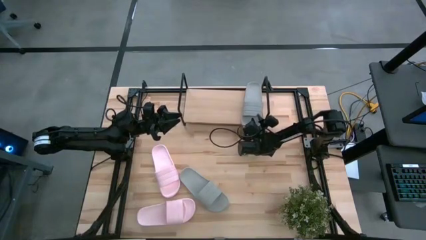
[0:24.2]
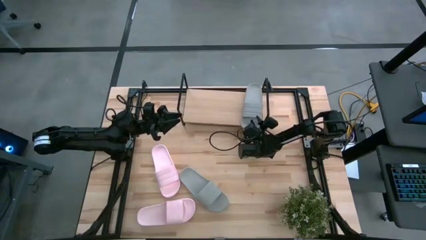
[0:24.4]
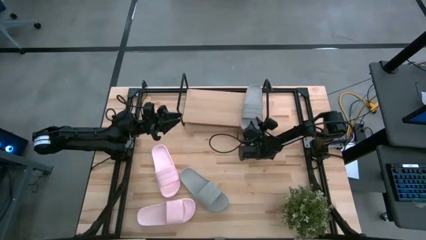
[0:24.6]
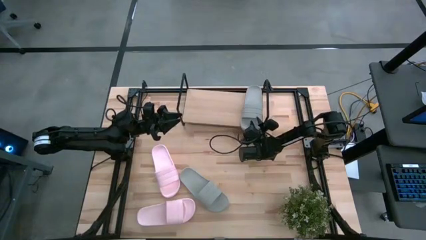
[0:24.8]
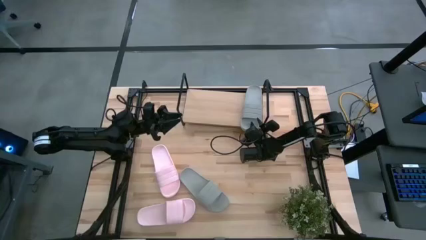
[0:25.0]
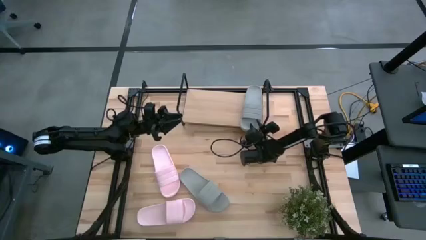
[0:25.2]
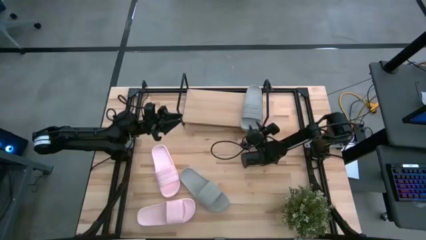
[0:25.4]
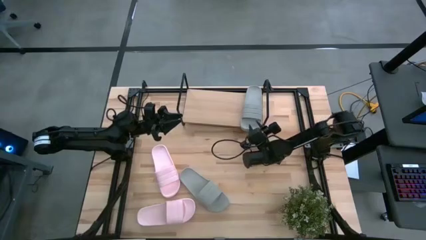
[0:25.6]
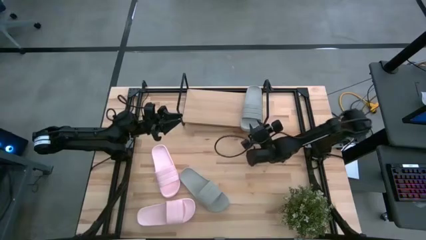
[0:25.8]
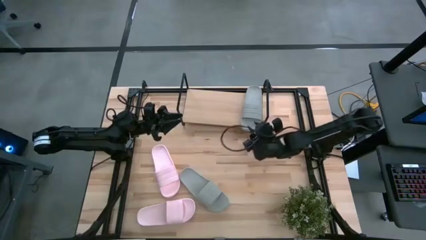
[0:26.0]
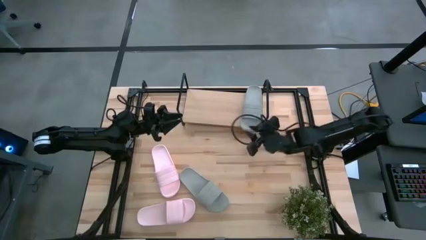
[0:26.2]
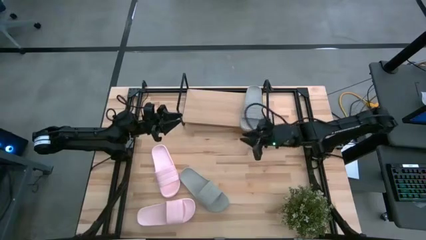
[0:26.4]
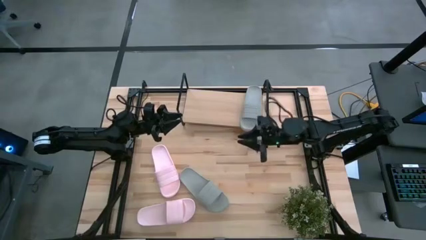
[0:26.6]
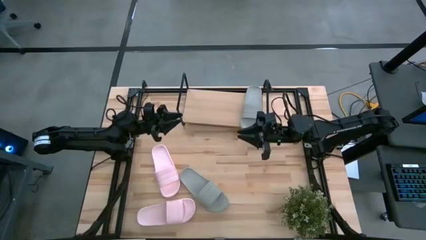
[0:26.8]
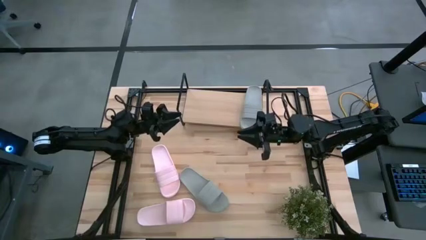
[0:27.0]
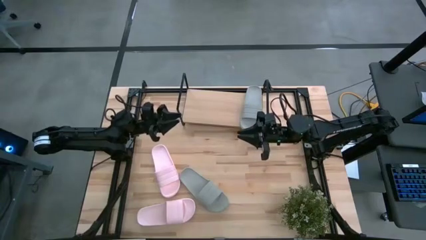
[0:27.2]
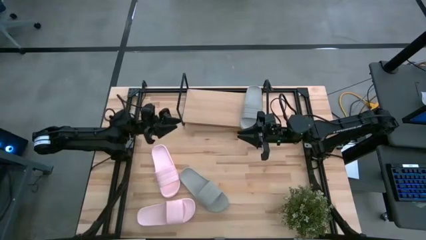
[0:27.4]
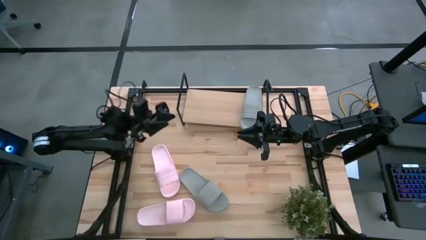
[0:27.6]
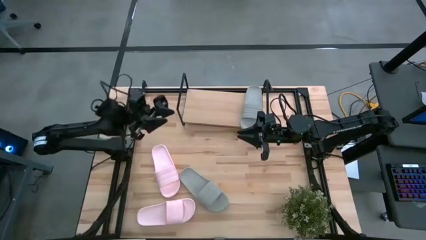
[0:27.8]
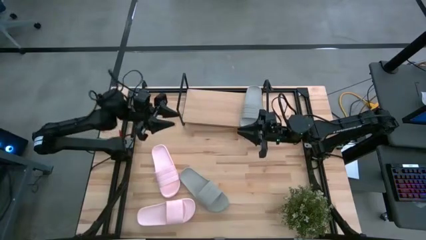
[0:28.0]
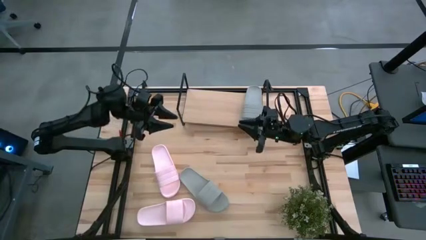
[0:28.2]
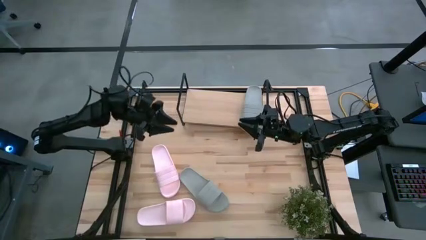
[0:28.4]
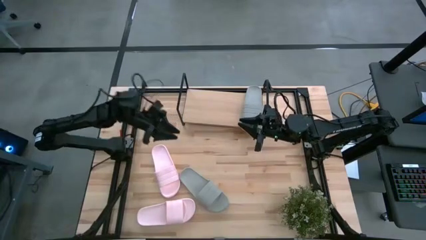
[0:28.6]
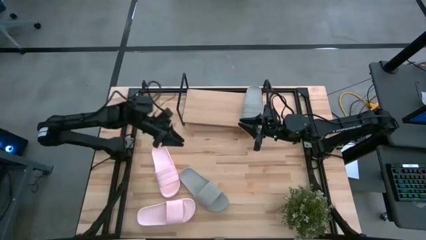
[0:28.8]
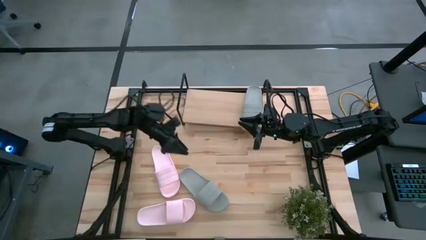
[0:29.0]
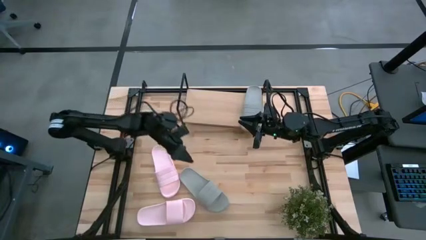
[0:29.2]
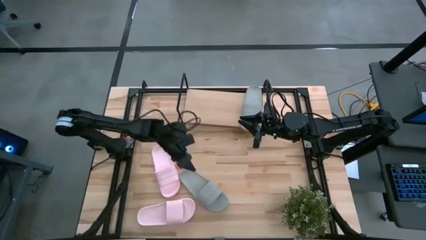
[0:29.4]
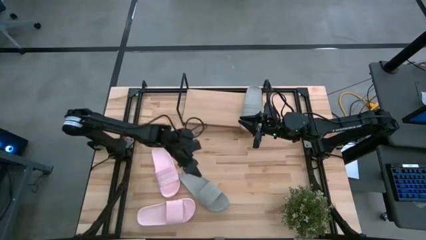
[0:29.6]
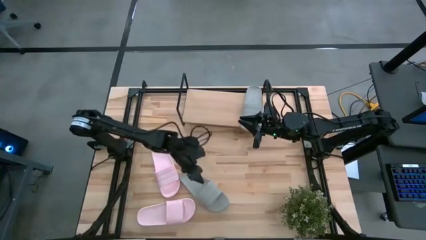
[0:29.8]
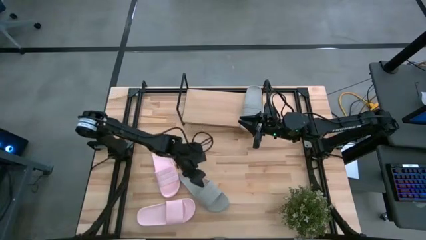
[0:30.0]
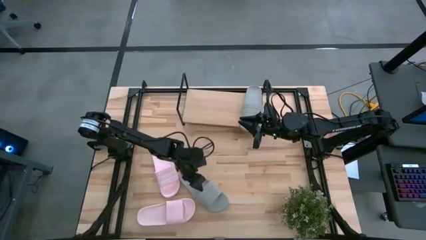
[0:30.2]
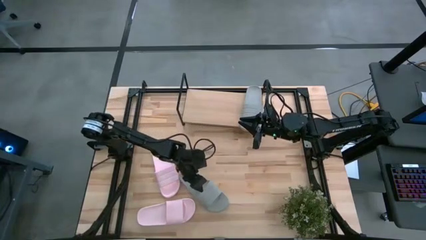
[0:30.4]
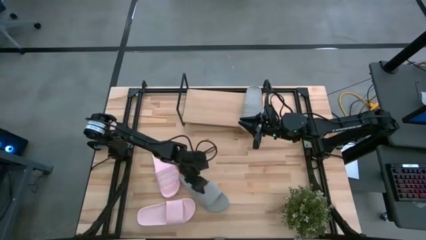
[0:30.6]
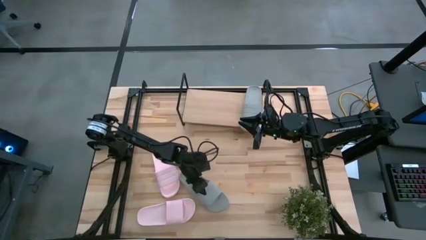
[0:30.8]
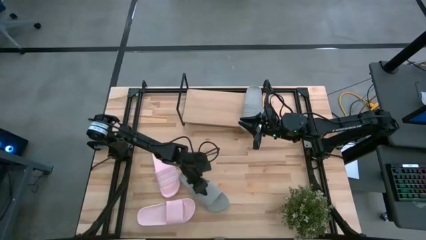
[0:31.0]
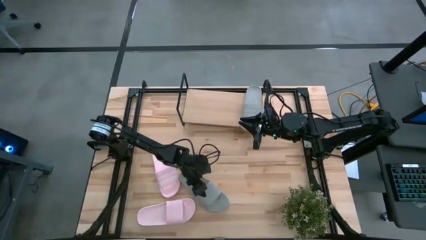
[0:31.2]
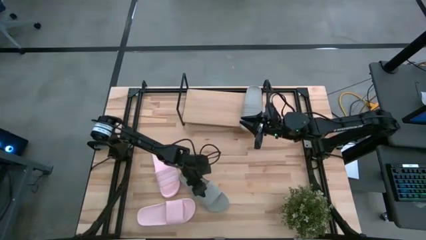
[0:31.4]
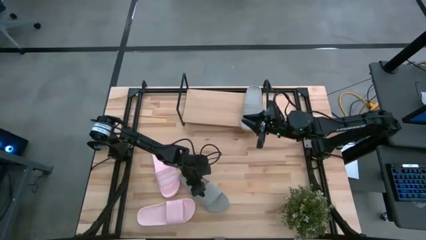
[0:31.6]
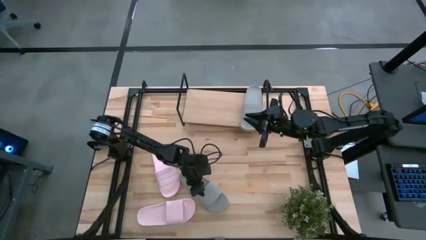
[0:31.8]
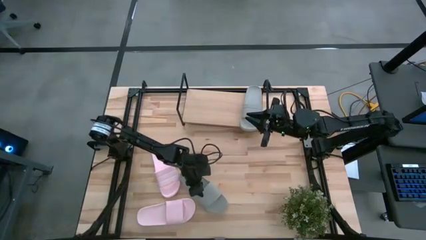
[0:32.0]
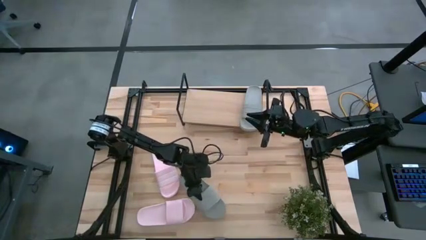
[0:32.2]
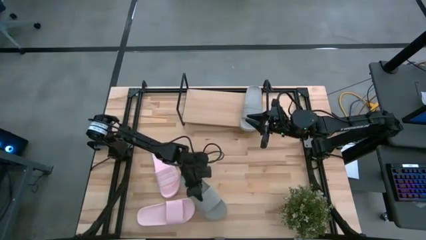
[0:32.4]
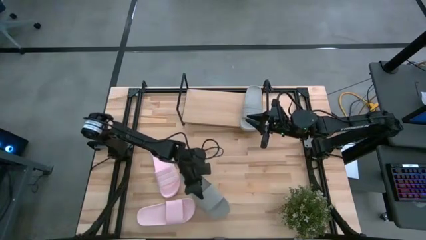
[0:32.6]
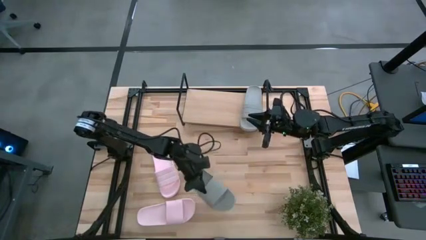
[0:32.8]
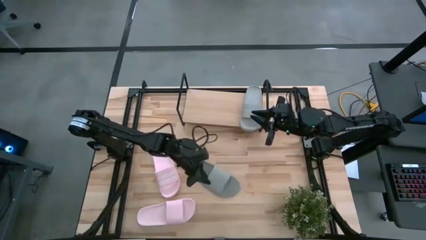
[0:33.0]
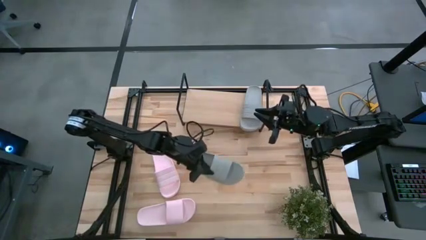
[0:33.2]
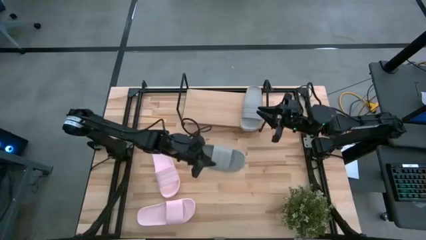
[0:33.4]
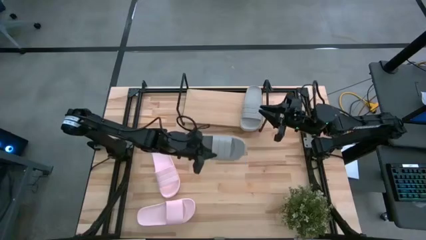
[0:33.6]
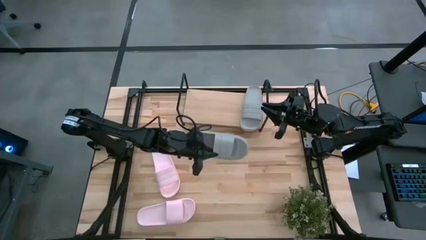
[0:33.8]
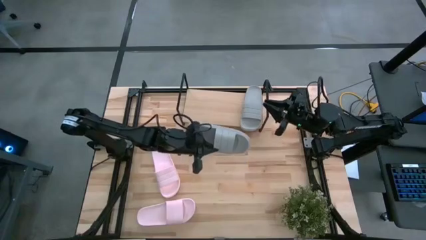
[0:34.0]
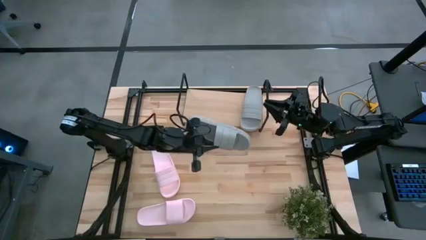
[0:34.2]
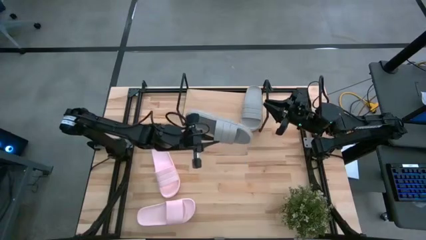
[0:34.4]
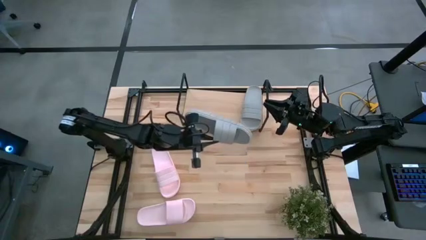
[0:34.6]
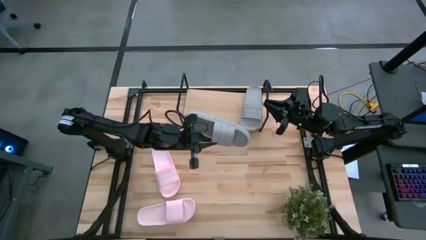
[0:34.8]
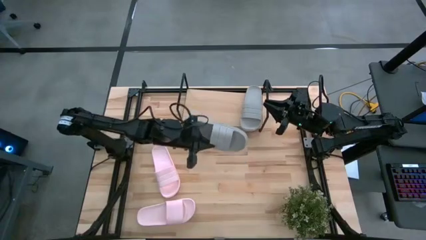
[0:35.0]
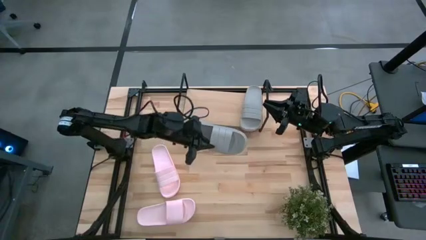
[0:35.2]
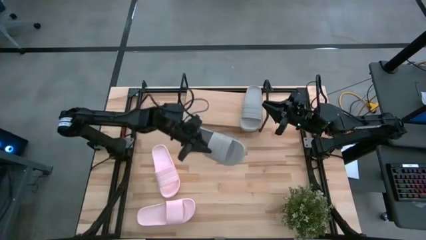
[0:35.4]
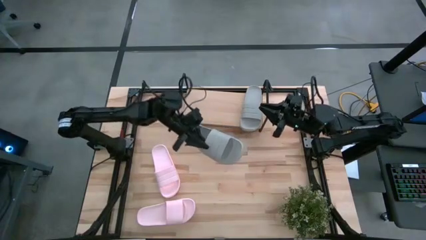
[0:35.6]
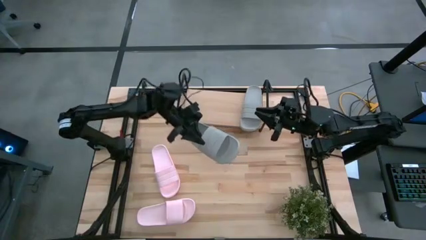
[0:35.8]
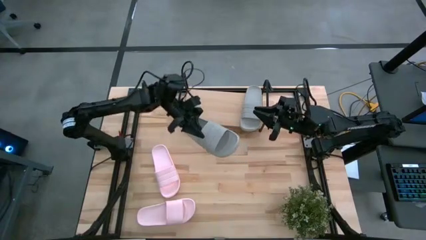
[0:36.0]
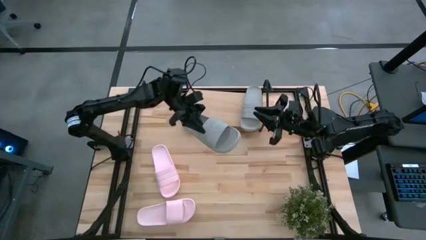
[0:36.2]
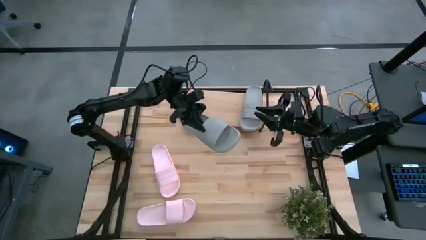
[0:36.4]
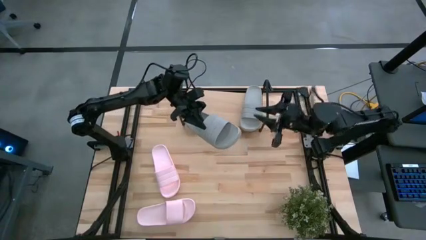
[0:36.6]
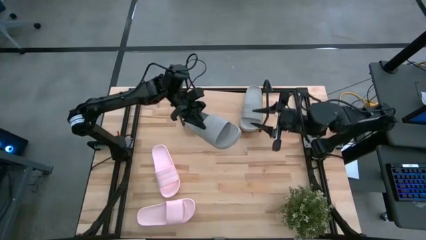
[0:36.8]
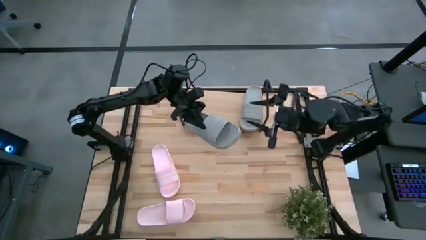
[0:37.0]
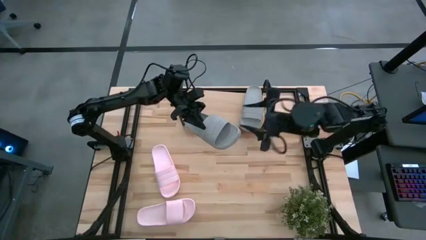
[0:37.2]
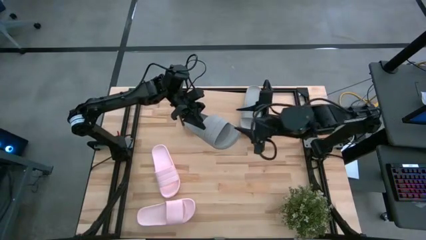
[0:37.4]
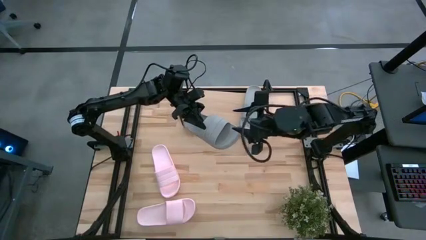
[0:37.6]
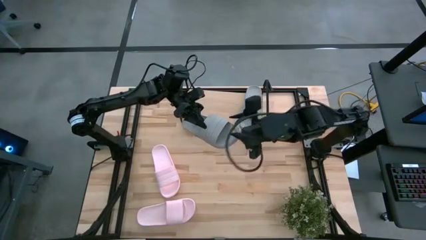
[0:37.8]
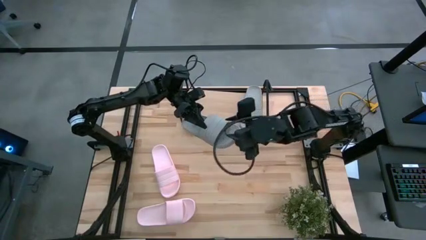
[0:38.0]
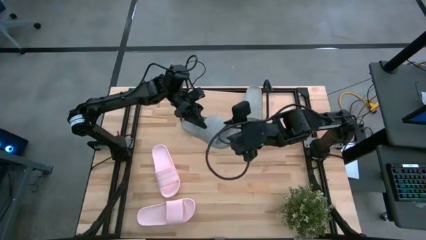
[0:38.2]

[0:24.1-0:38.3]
Task: Pick and place slides into the shelf
Put the gray slipper on the shelf

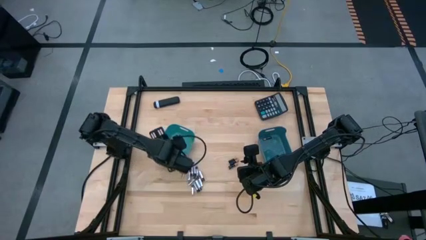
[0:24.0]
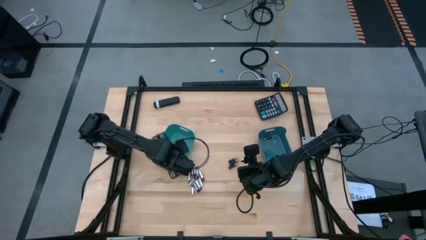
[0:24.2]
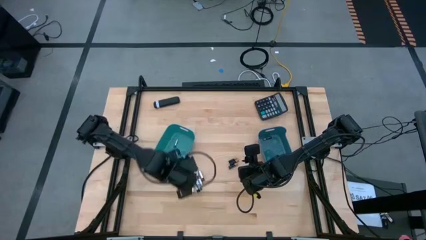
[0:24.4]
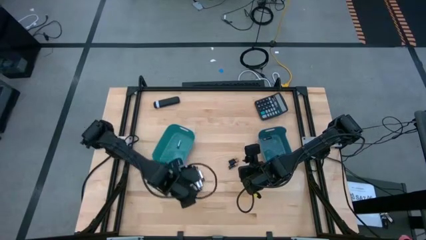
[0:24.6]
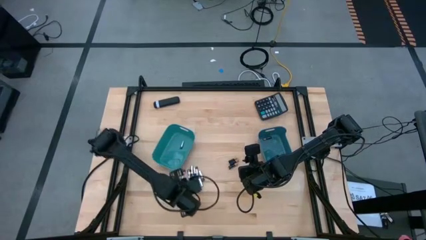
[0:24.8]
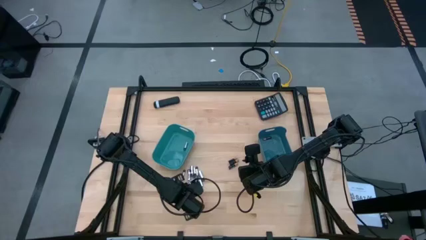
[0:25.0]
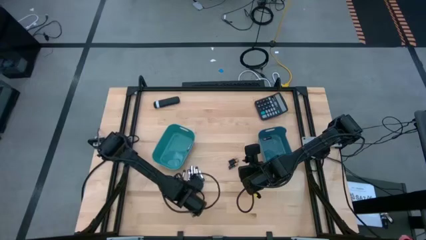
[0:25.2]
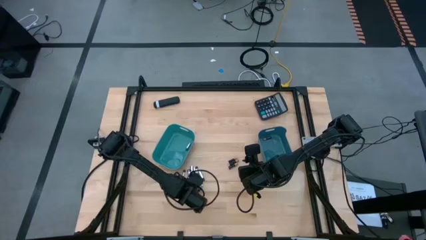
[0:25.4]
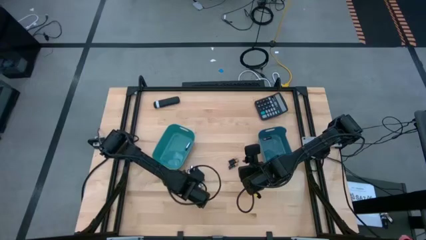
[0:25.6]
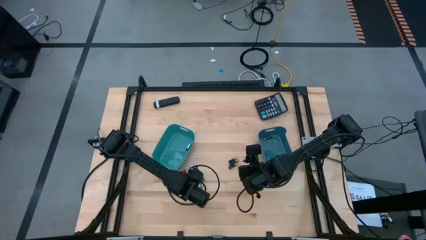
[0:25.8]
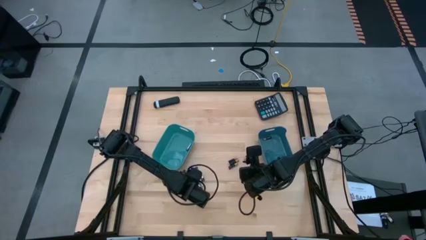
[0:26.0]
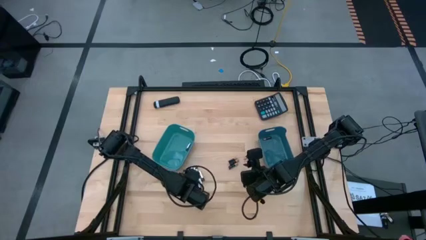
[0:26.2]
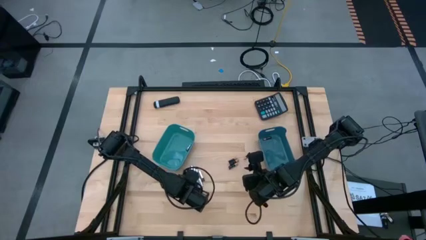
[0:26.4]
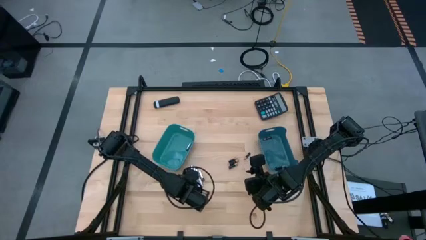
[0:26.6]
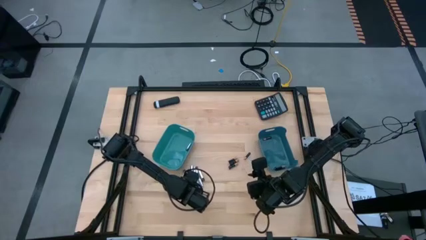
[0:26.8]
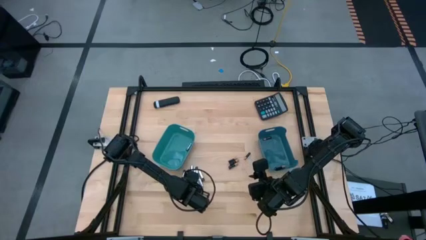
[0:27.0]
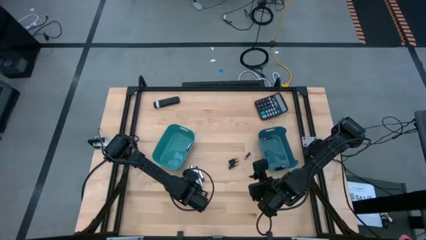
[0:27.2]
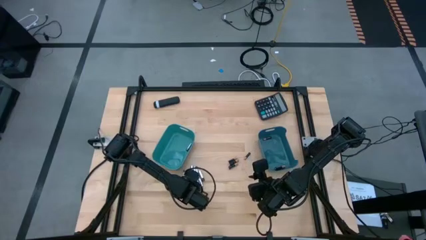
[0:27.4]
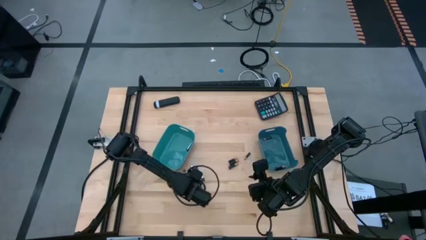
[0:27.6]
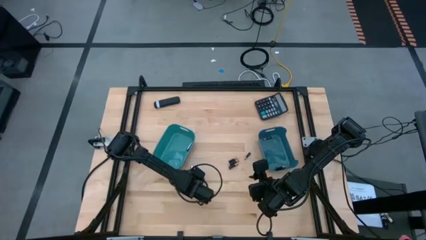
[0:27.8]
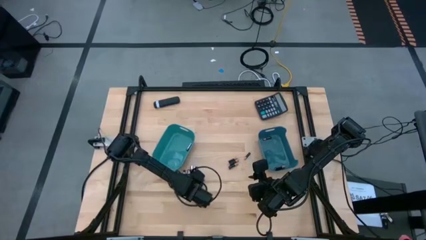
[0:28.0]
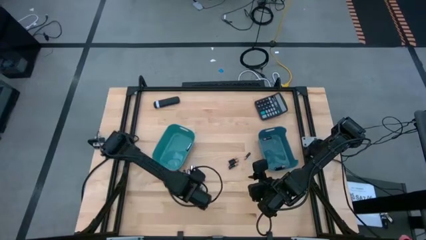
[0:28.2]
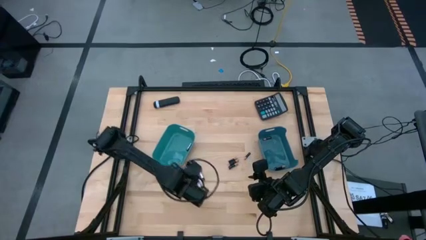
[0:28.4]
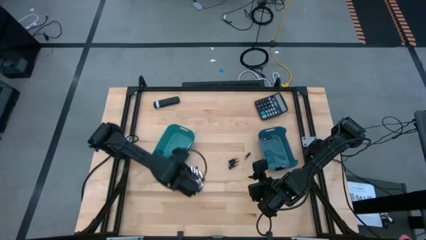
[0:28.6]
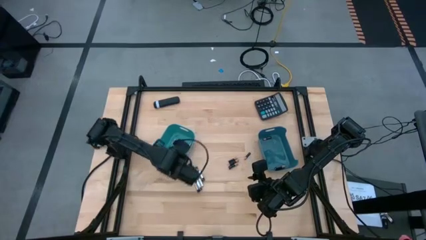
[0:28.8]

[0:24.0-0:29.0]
Task: Sort batteries
Put the white battery into the green bin
